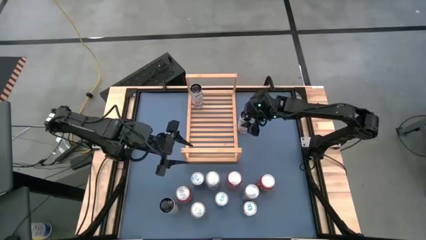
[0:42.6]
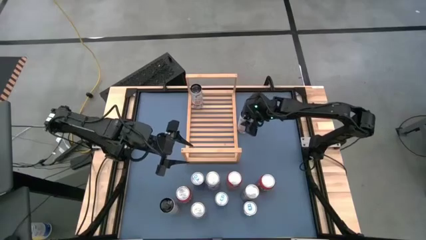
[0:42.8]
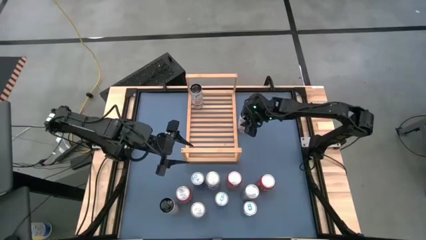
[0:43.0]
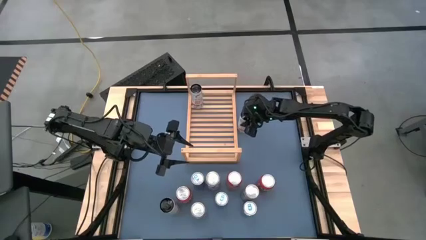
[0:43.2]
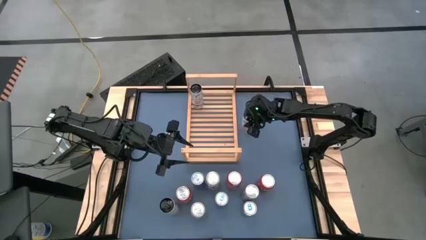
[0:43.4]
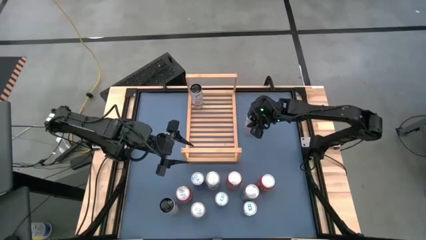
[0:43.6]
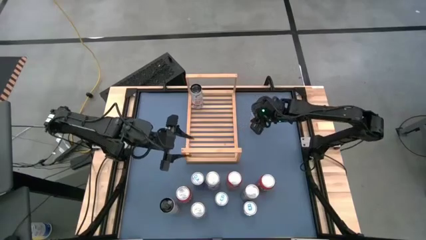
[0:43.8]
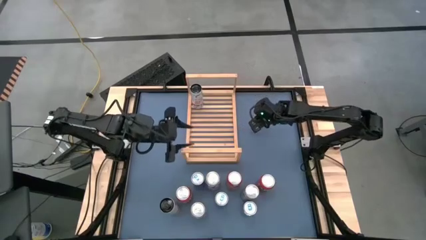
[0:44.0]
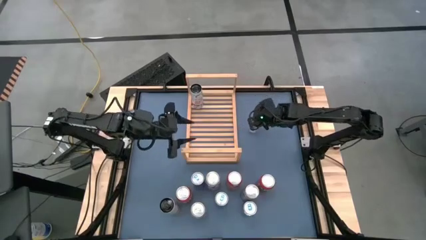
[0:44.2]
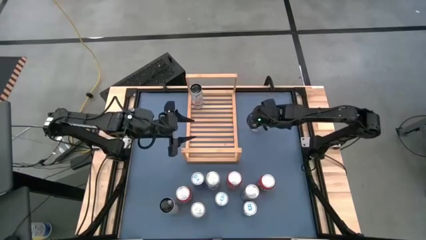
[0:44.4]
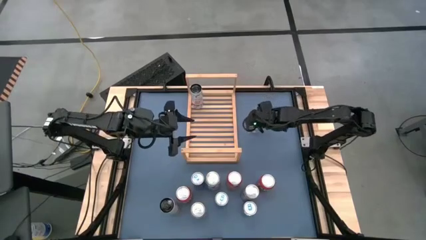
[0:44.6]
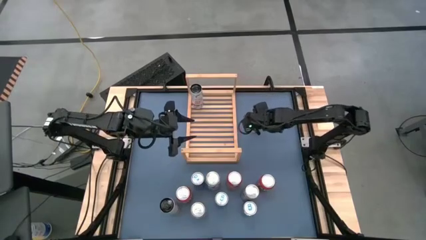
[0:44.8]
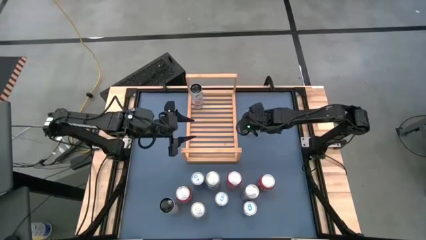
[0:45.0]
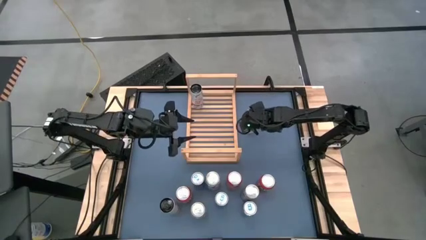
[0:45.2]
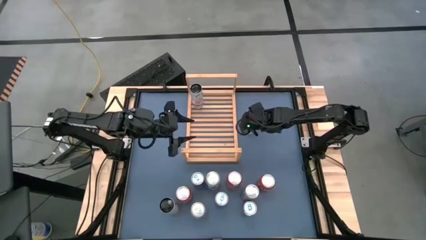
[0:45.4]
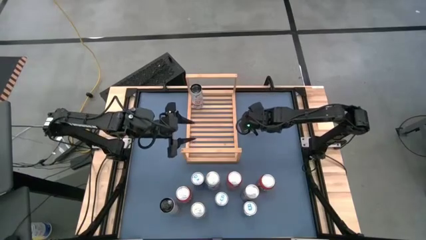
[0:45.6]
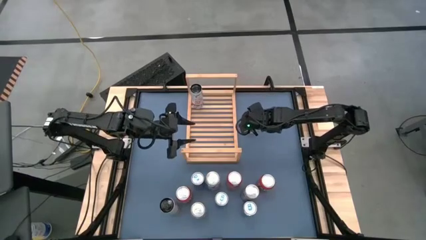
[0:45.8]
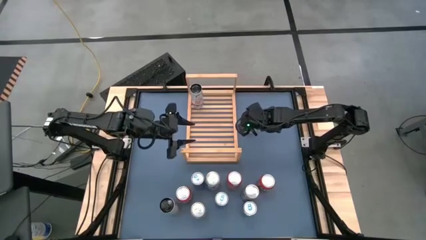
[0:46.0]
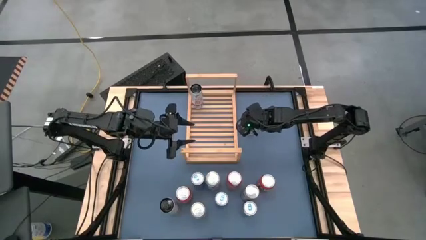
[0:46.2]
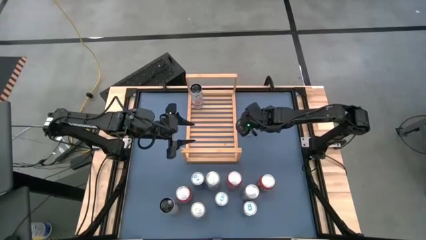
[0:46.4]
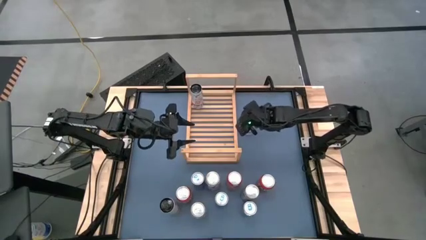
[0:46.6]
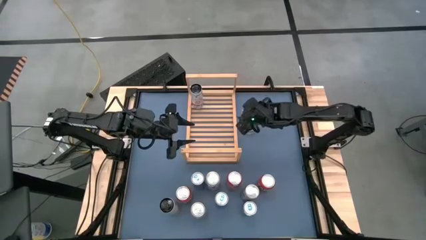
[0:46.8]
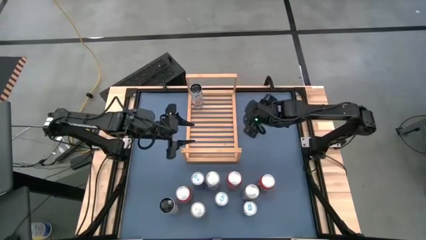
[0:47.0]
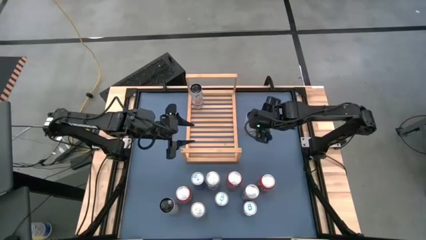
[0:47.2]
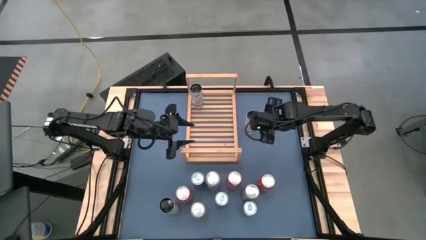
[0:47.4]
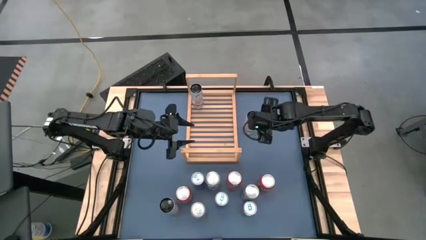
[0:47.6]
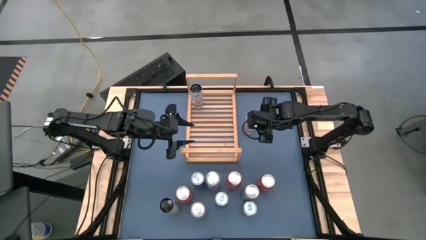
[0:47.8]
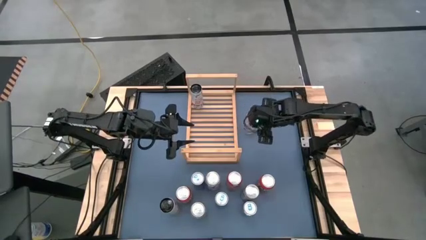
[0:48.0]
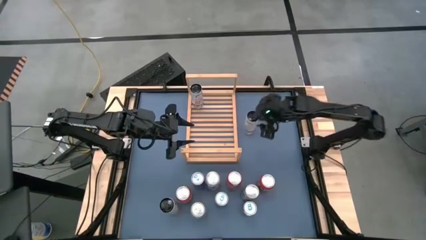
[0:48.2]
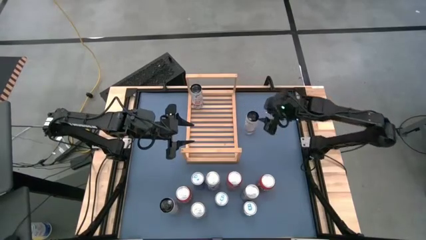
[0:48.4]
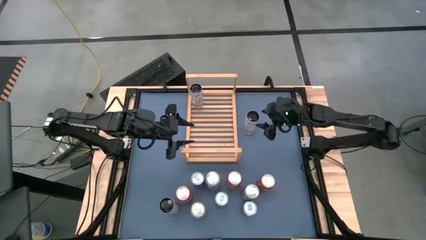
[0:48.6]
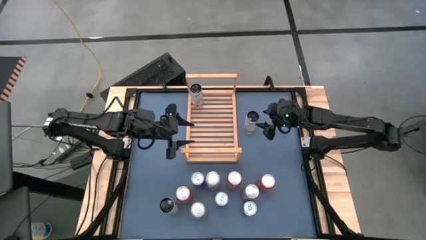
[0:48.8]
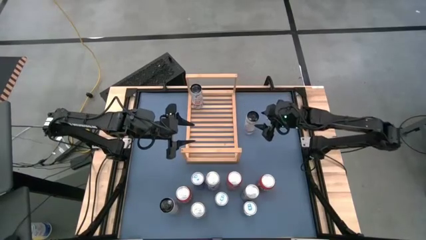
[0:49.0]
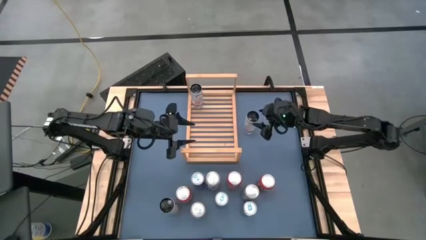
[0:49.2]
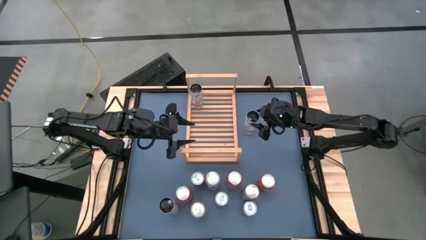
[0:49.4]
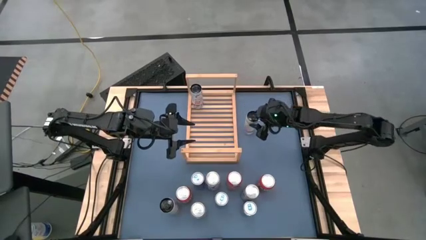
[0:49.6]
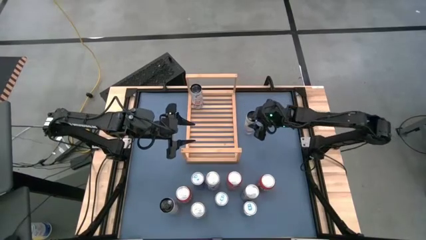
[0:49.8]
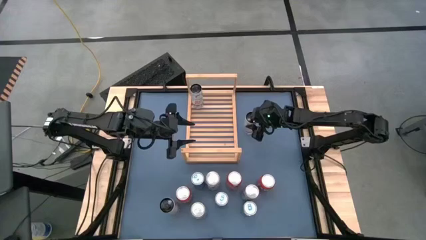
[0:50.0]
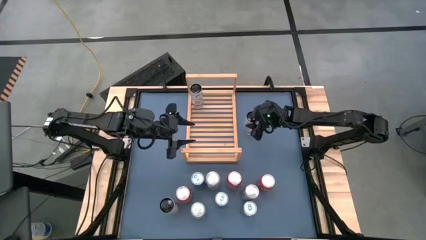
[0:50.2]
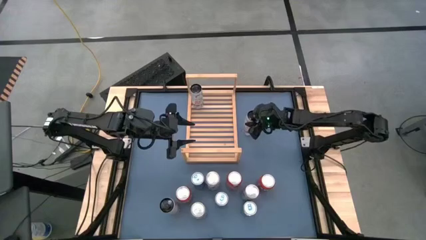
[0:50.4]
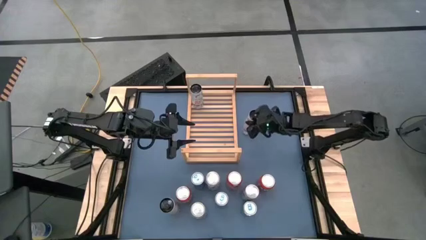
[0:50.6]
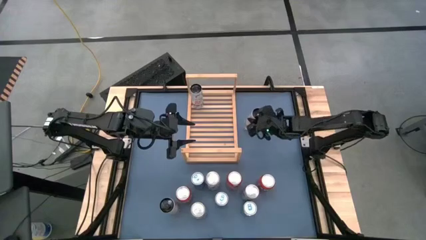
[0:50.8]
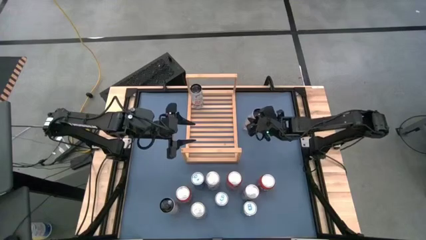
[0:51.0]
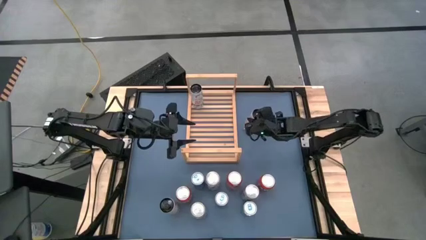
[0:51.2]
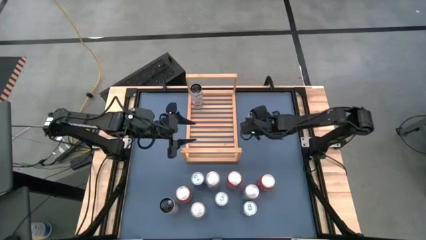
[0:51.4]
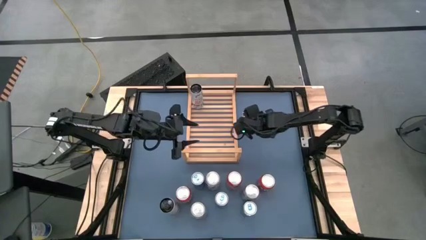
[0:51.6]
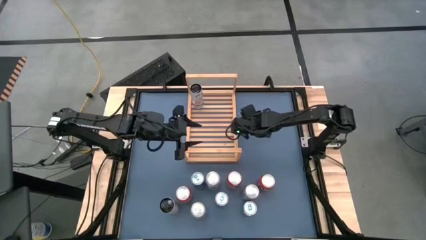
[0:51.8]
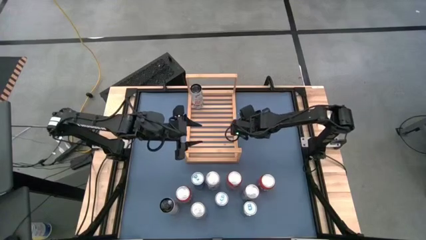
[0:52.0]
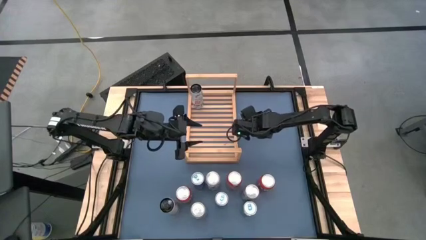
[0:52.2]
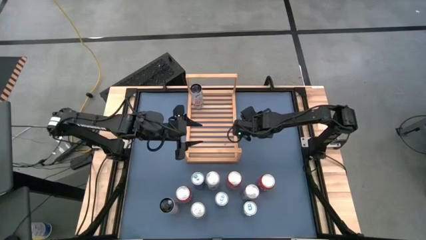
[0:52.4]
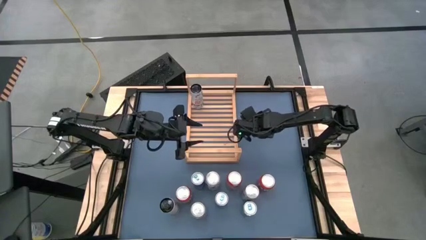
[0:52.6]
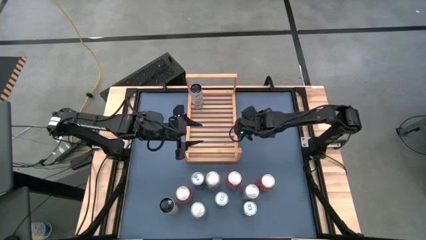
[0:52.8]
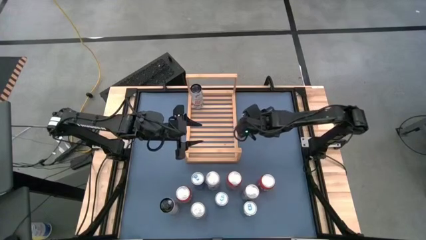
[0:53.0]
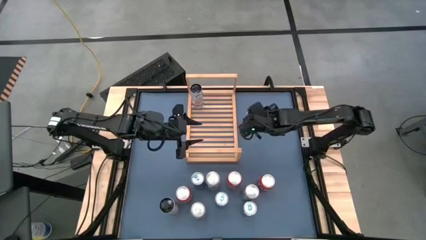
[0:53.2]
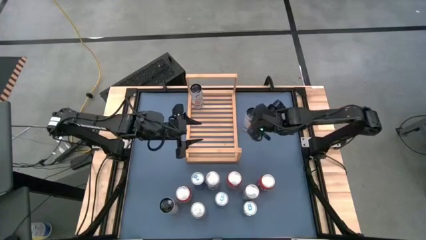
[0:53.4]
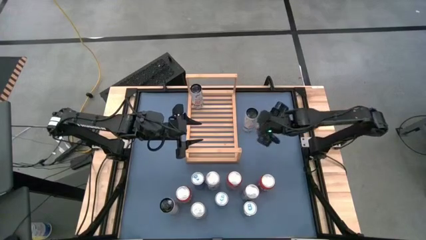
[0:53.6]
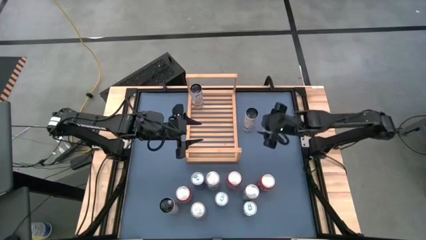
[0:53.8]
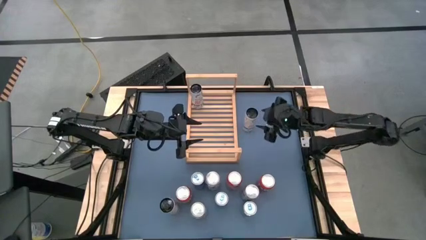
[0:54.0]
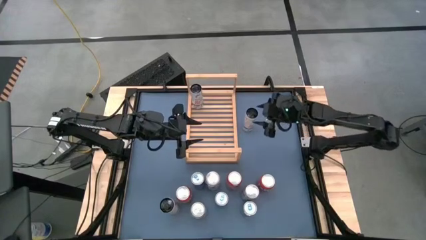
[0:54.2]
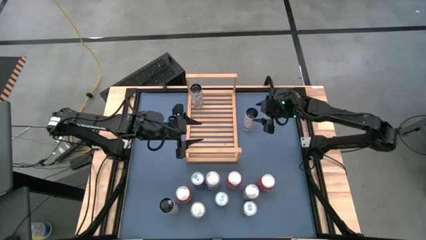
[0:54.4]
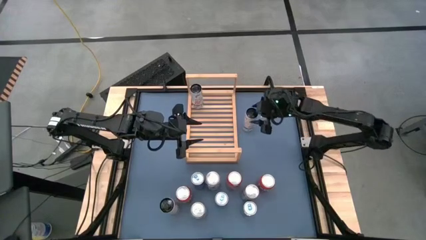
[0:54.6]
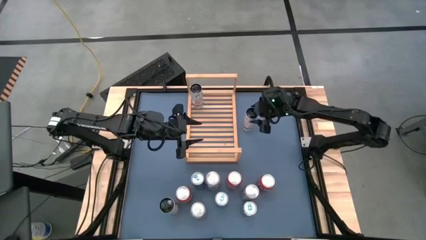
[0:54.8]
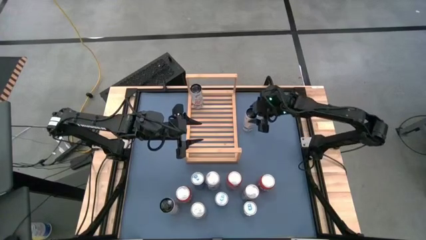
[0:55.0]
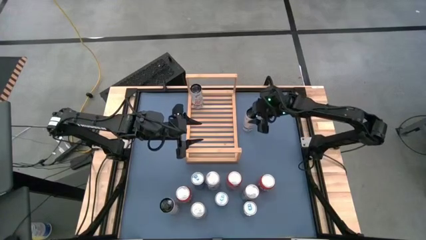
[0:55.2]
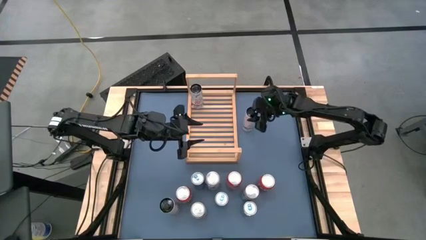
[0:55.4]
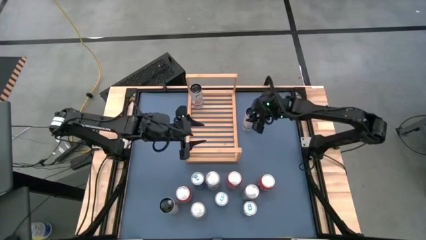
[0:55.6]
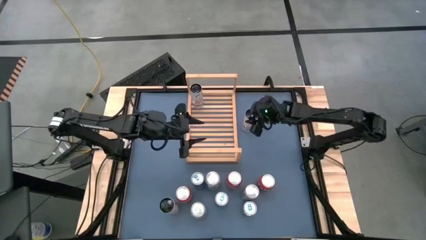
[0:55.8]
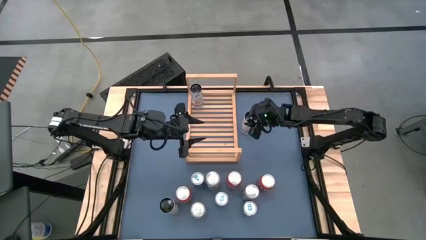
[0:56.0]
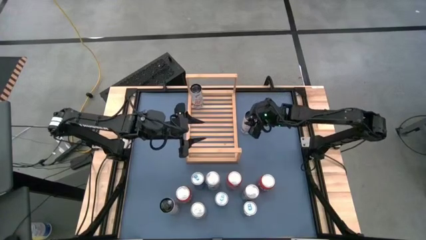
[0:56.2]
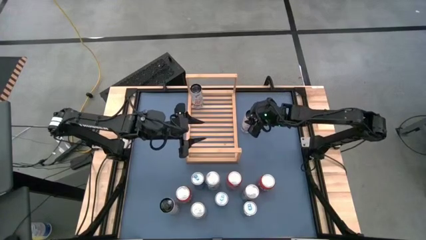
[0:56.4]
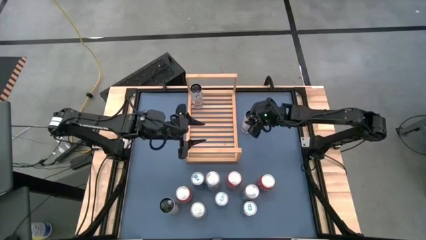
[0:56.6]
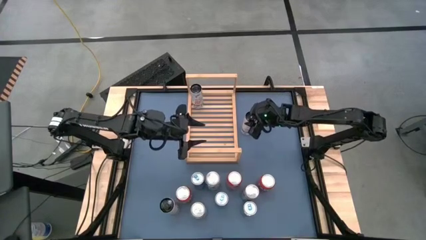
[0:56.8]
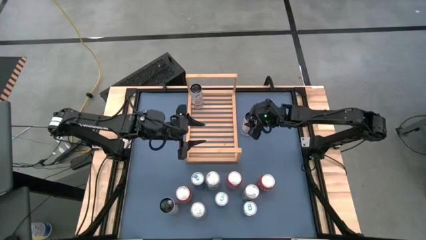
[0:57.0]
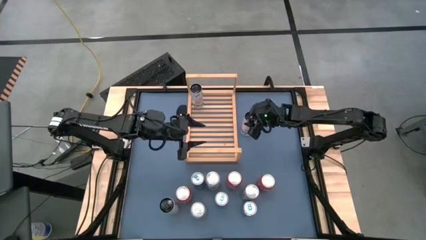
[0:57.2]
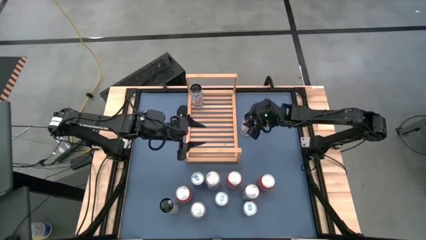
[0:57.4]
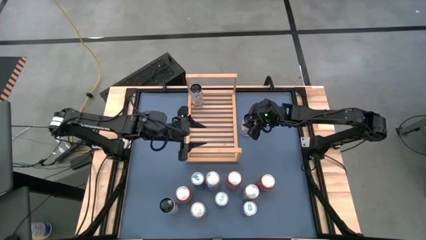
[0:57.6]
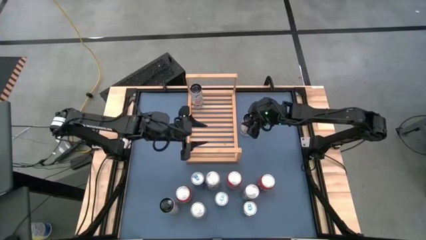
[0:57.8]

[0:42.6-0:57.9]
Task: Place canned beverage on shelf
Put the right white soda can on the shelf aligned with the other white soda can

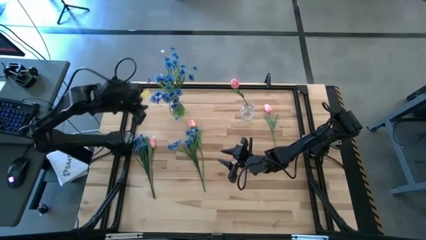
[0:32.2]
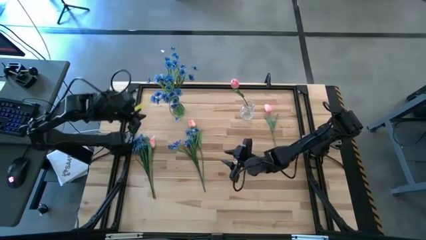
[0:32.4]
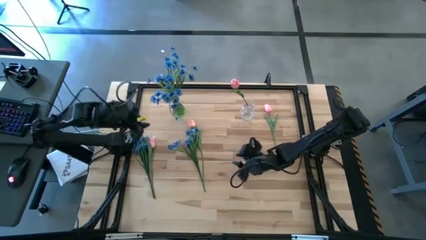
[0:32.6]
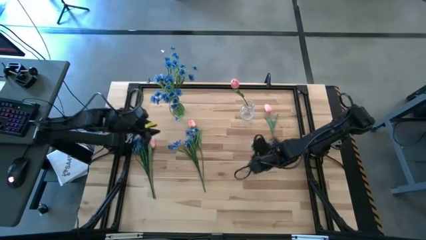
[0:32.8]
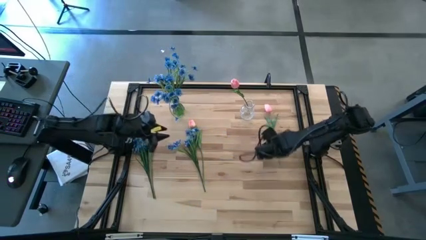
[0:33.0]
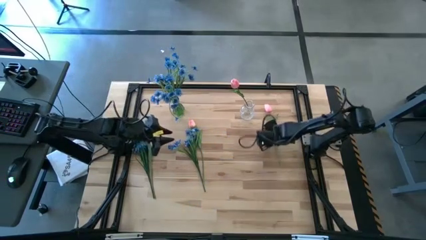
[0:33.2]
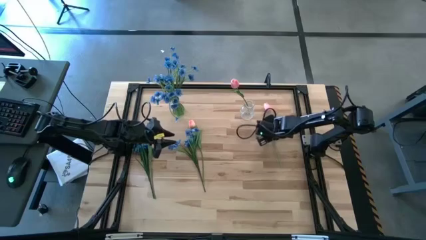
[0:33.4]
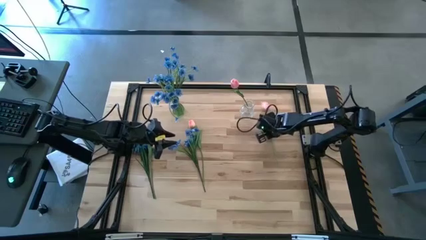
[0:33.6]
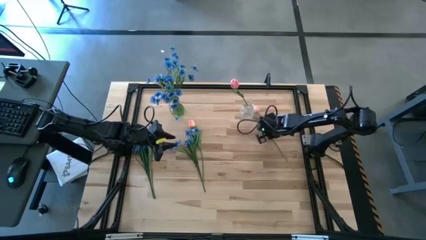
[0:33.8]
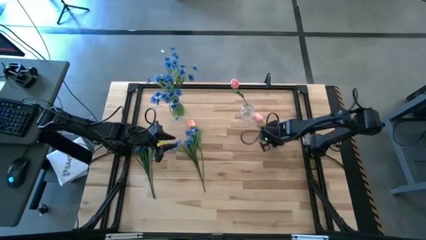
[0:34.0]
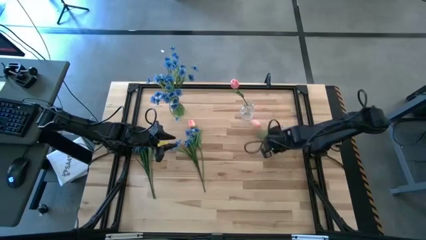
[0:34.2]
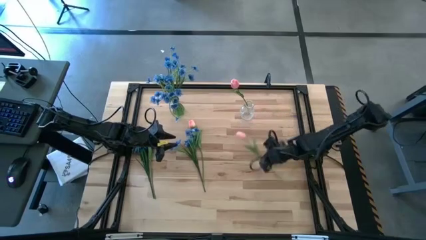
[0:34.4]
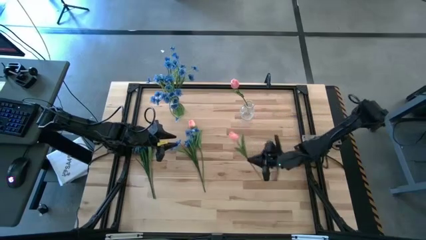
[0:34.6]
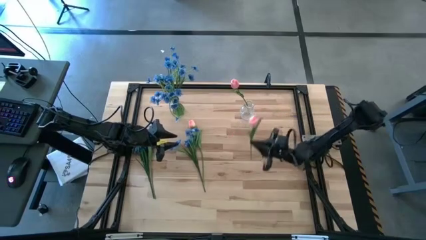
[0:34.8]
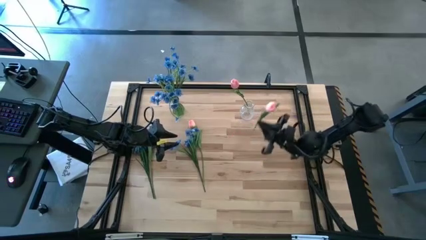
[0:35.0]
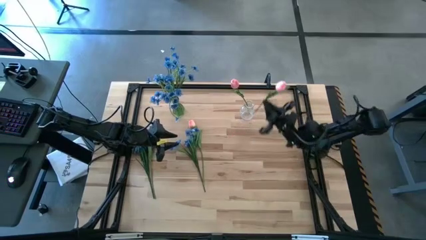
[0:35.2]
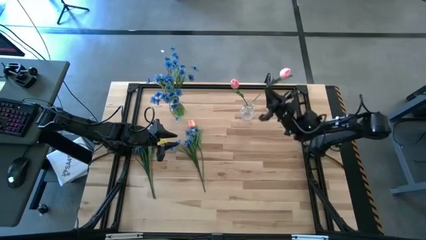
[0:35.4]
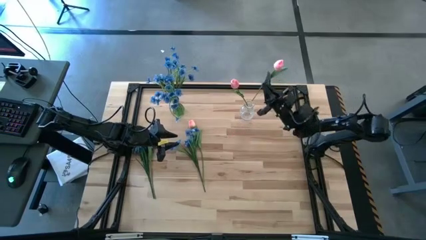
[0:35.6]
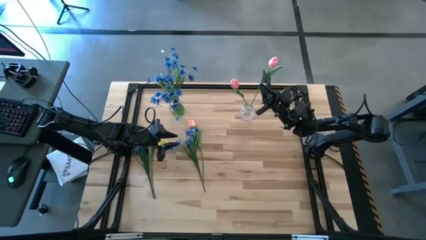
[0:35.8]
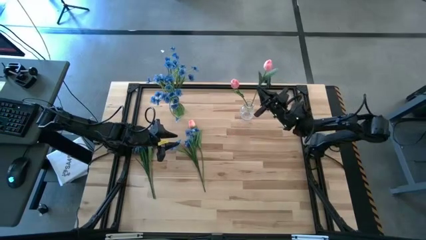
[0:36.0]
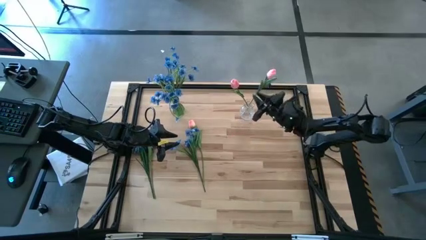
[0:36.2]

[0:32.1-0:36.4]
Task: Sort flowers into vase by color
Put the top pink flower into the transparent vase
